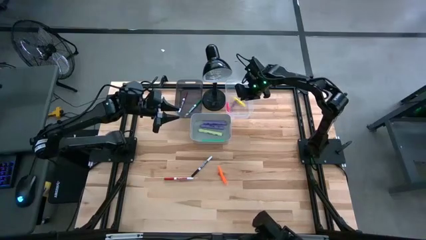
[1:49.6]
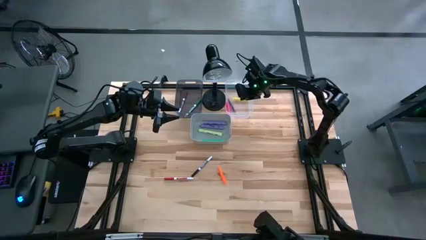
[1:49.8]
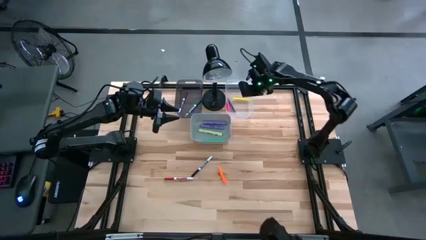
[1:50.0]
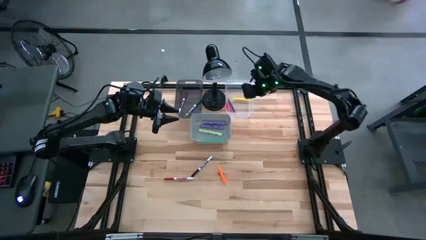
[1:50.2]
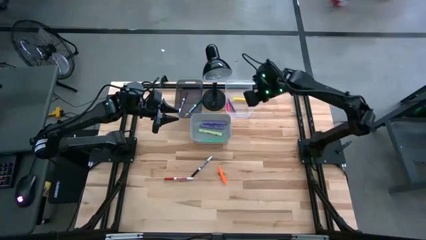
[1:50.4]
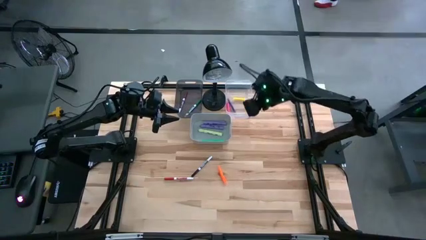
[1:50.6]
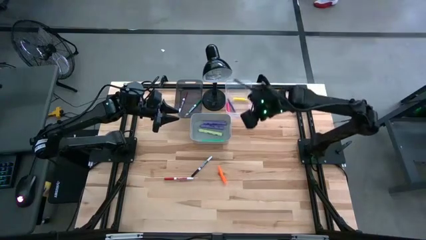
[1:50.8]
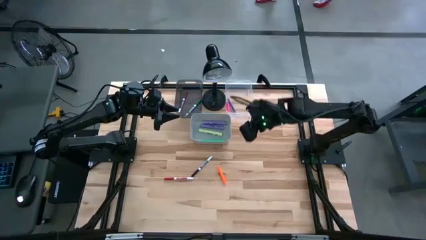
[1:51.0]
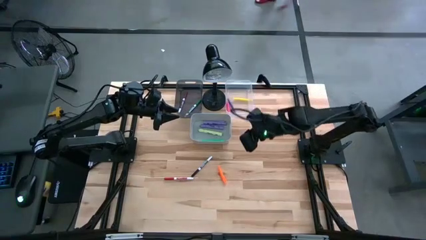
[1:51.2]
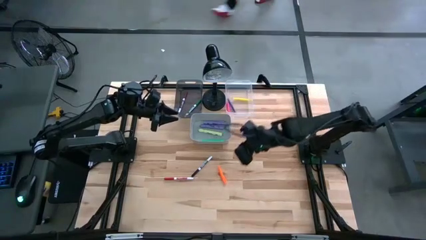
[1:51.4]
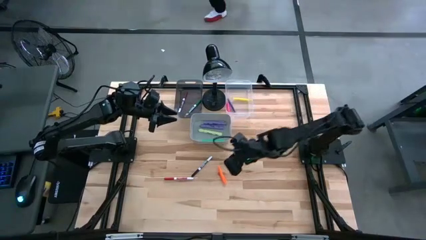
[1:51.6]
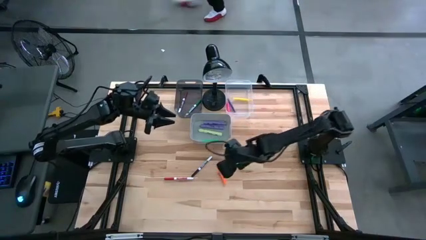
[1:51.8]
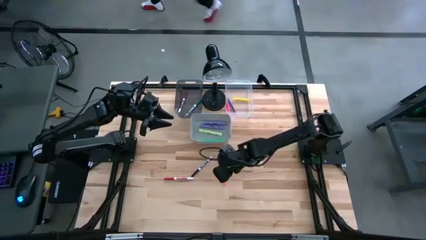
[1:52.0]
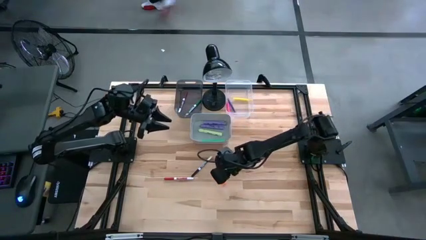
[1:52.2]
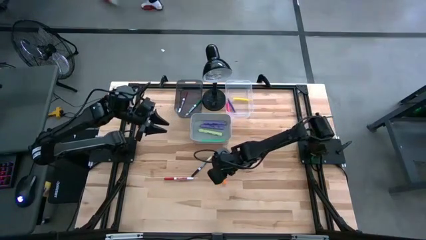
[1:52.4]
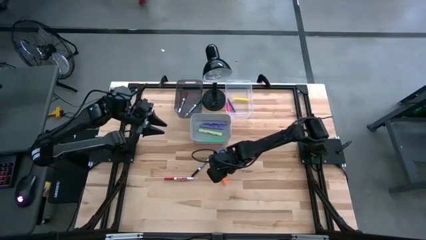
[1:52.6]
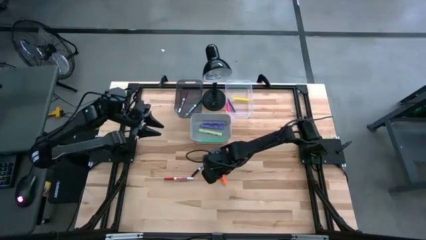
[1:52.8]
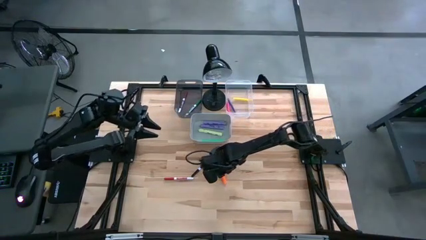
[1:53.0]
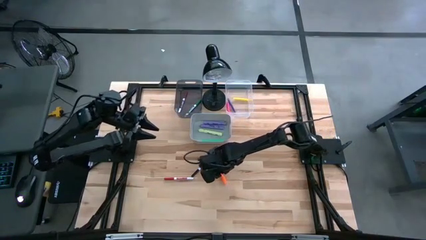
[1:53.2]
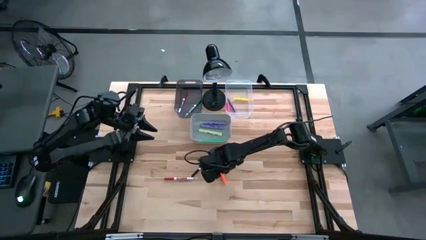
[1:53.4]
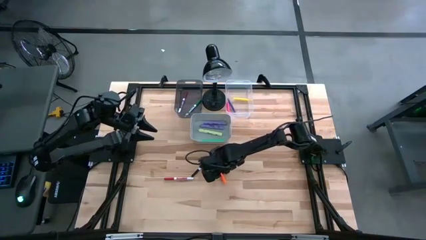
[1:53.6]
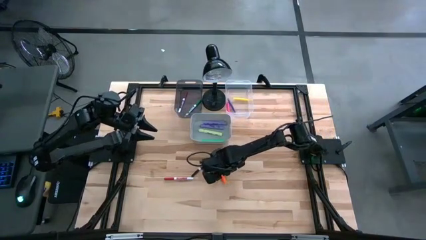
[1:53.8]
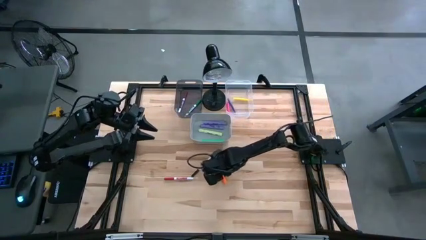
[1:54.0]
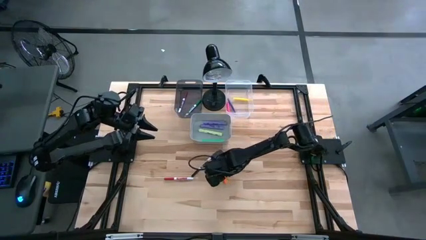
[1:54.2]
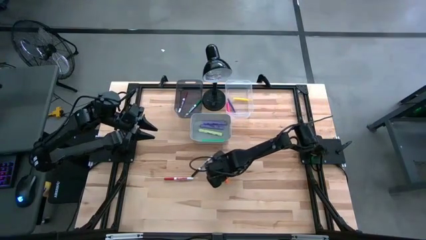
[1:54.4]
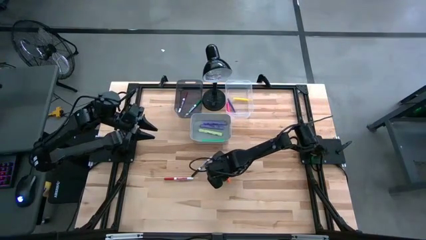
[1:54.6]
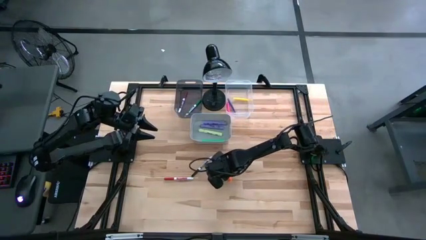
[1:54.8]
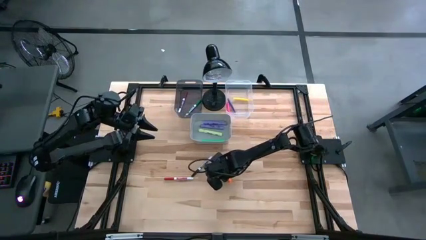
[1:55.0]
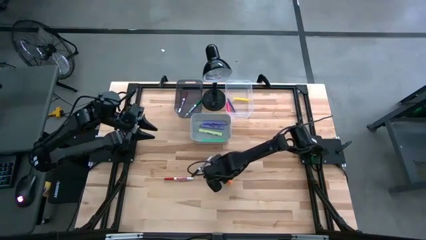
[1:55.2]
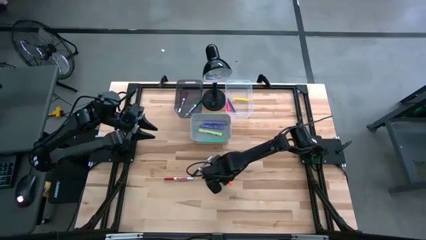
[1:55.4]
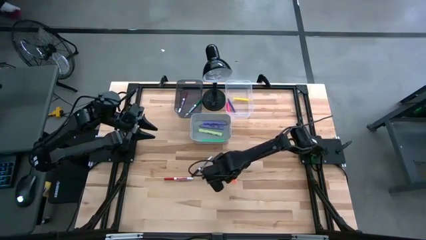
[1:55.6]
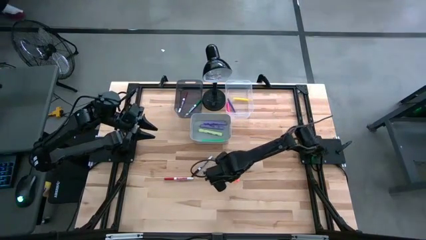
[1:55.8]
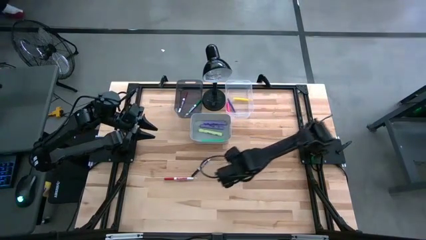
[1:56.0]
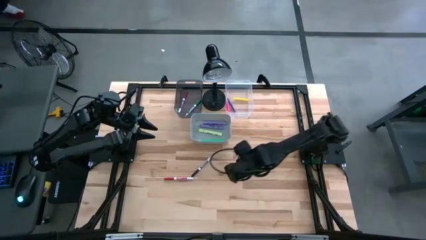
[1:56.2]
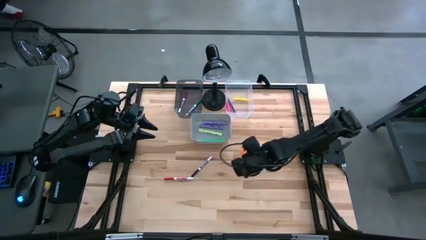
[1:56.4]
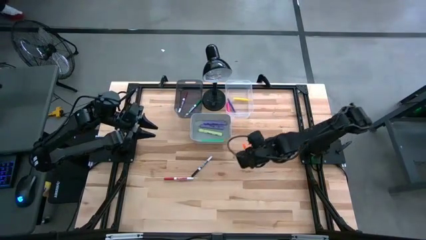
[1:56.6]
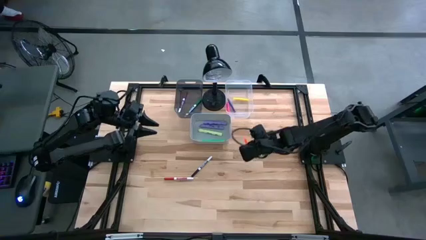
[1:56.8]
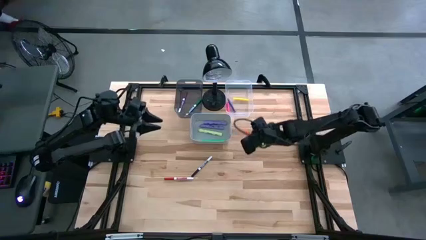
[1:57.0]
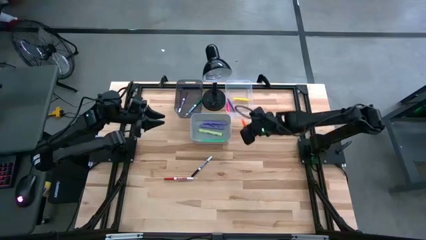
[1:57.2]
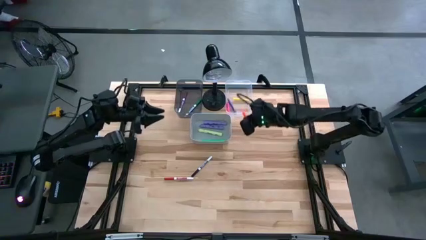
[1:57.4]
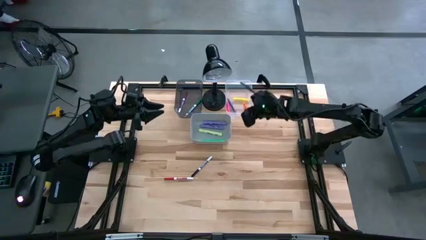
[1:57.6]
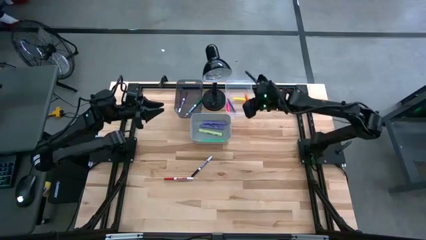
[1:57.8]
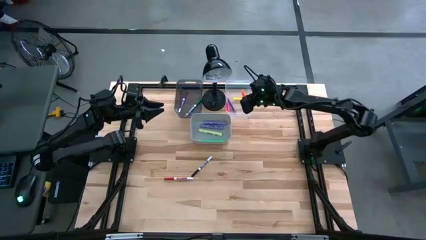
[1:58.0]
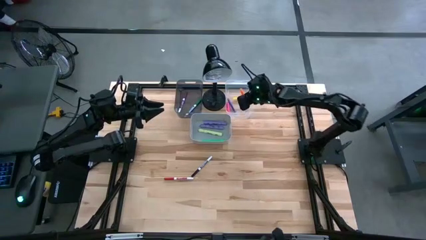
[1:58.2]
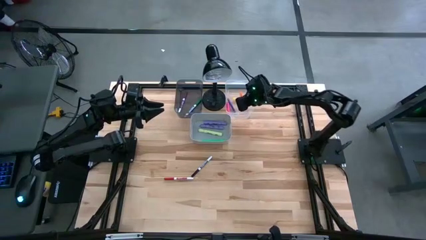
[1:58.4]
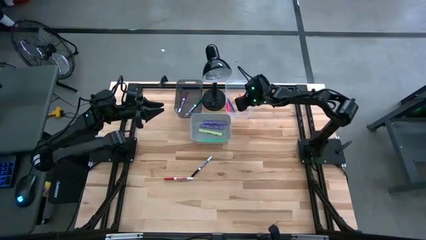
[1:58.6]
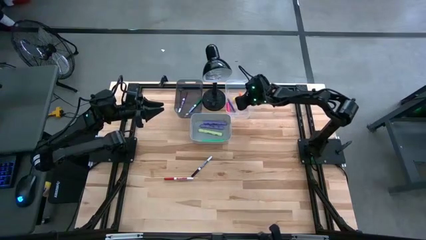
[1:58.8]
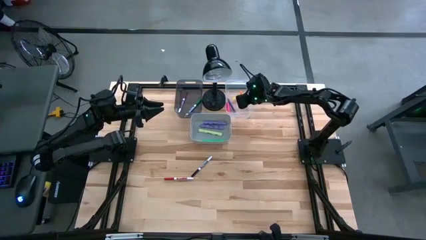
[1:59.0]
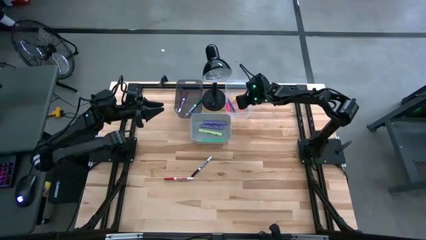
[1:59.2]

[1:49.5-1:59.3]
Task: Pick & Place Markers
Put the small orange marker into the transparent bin

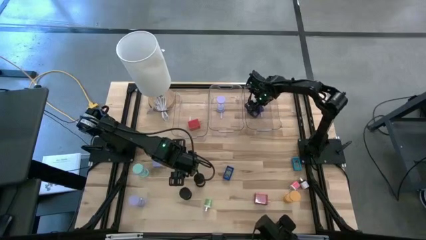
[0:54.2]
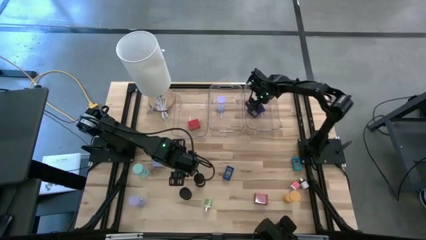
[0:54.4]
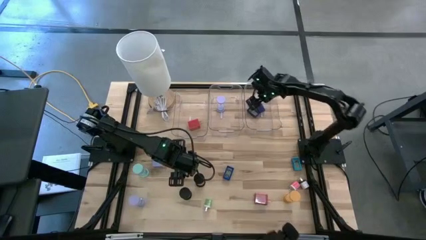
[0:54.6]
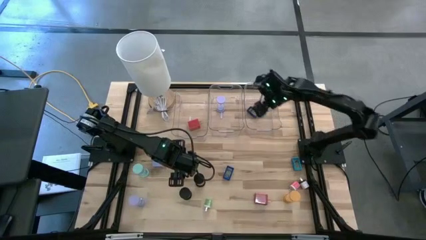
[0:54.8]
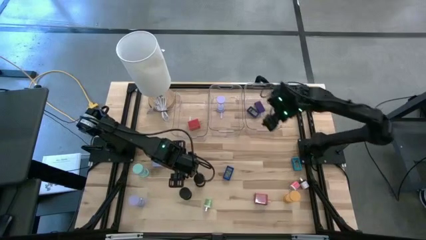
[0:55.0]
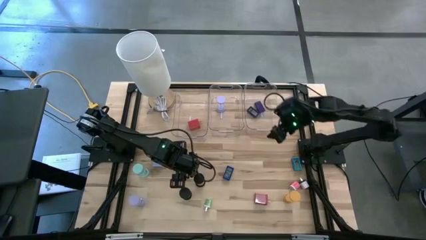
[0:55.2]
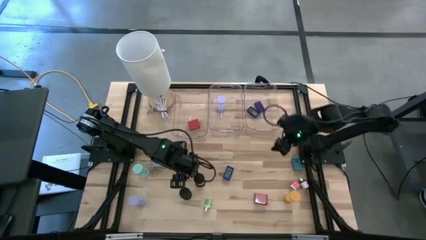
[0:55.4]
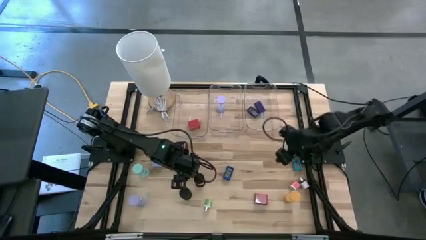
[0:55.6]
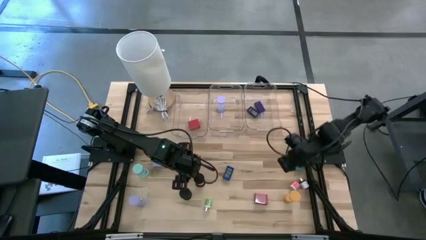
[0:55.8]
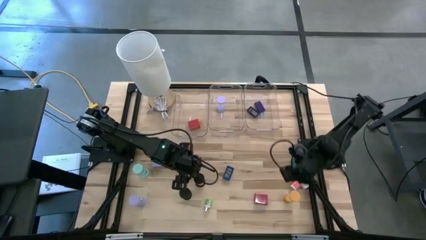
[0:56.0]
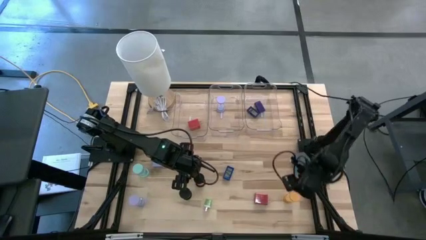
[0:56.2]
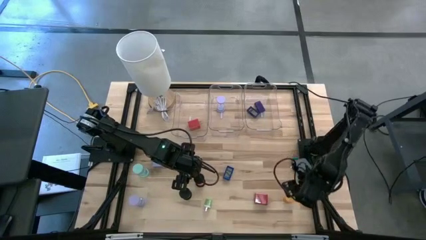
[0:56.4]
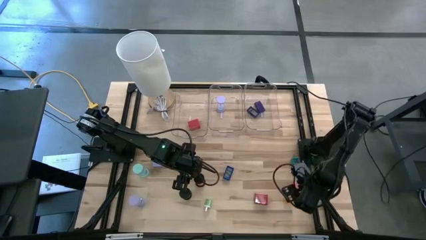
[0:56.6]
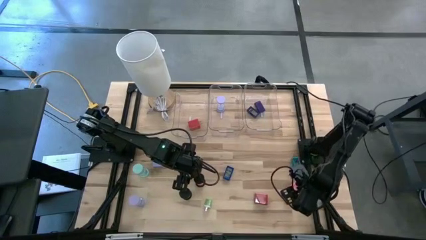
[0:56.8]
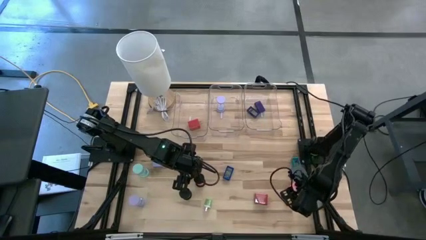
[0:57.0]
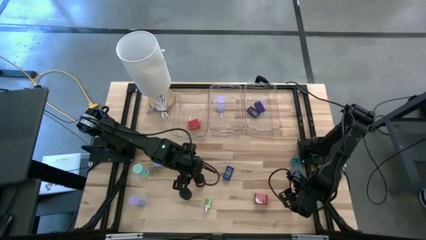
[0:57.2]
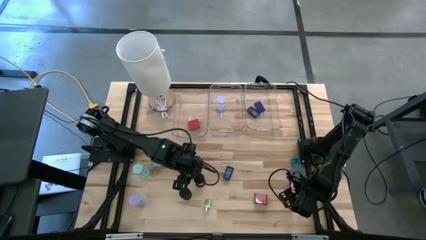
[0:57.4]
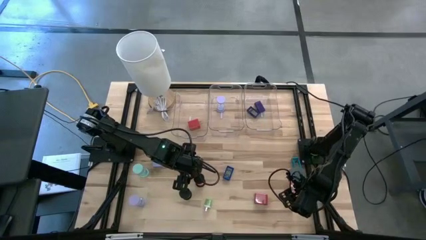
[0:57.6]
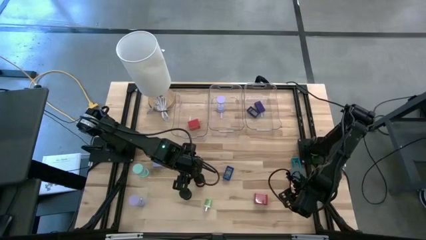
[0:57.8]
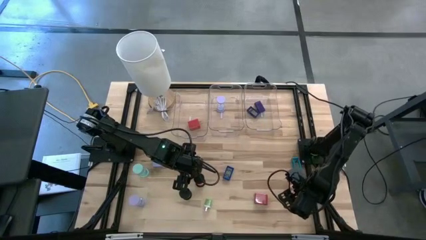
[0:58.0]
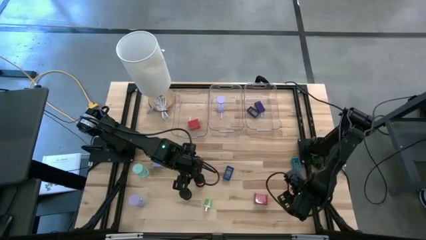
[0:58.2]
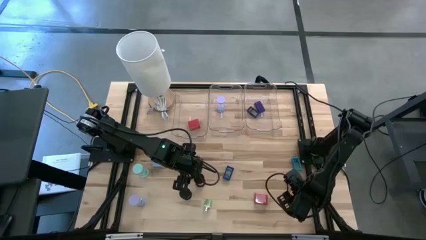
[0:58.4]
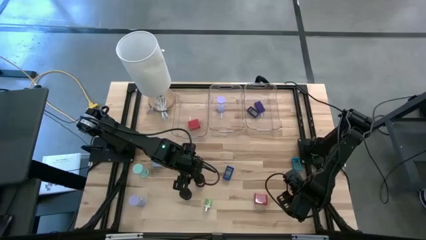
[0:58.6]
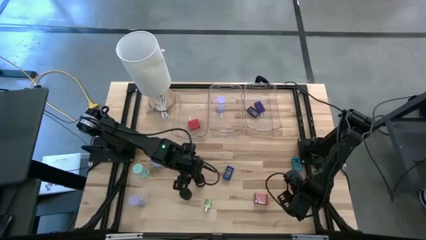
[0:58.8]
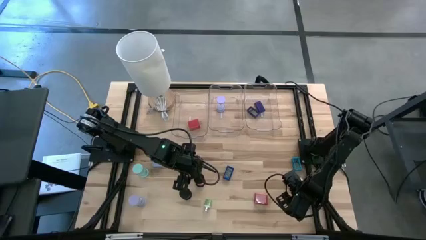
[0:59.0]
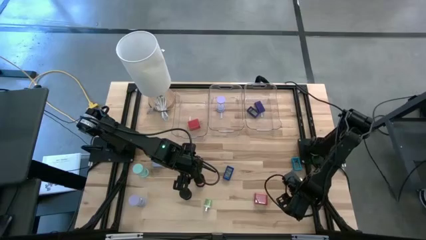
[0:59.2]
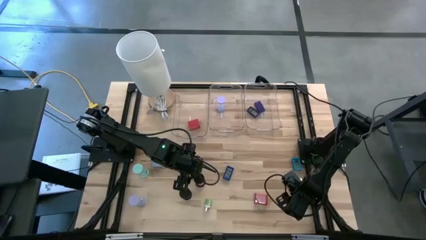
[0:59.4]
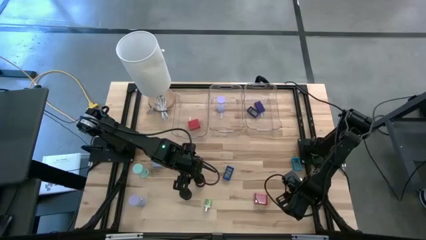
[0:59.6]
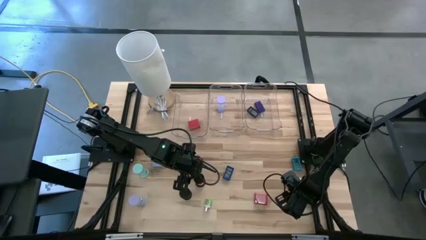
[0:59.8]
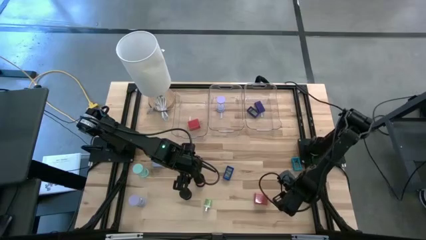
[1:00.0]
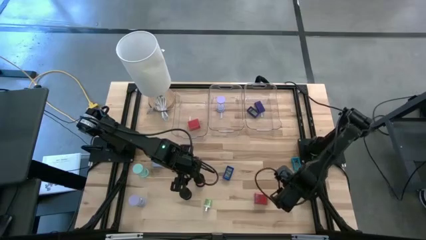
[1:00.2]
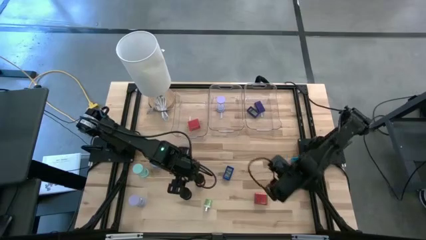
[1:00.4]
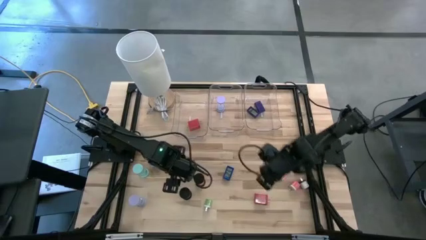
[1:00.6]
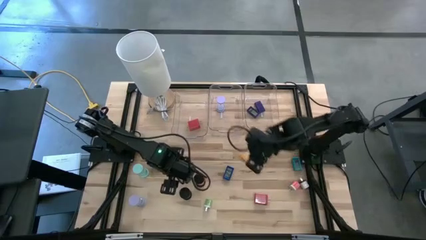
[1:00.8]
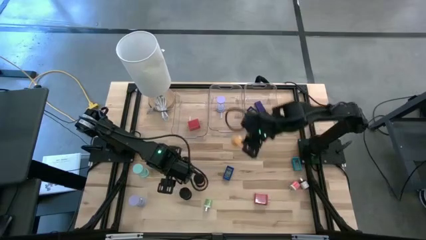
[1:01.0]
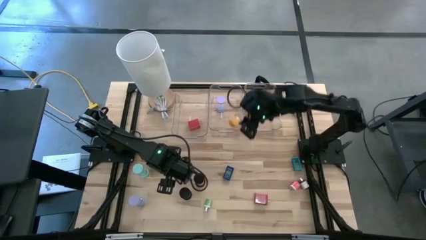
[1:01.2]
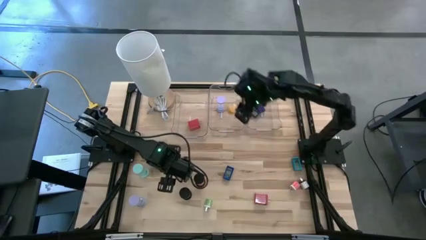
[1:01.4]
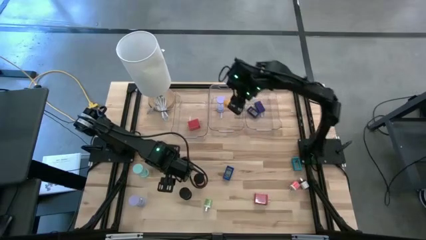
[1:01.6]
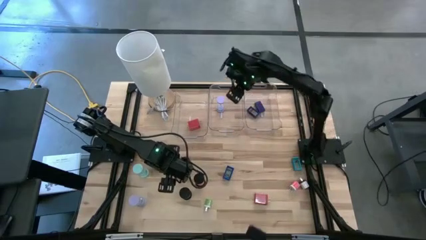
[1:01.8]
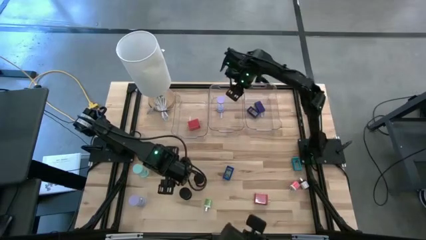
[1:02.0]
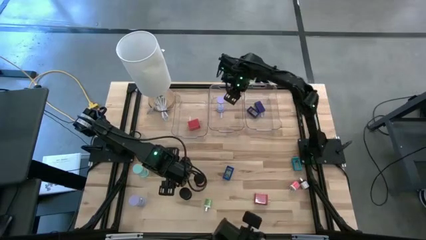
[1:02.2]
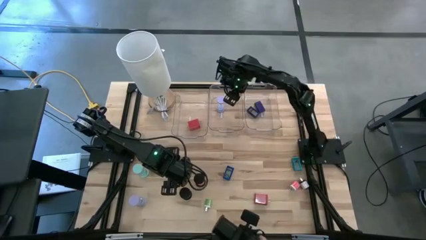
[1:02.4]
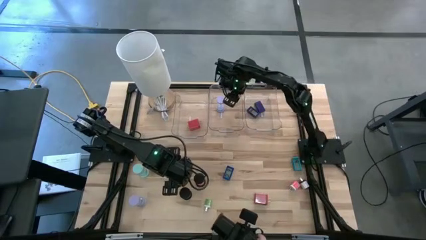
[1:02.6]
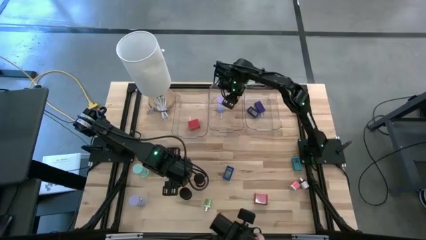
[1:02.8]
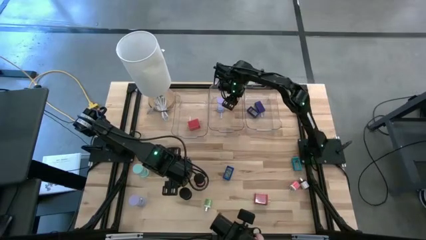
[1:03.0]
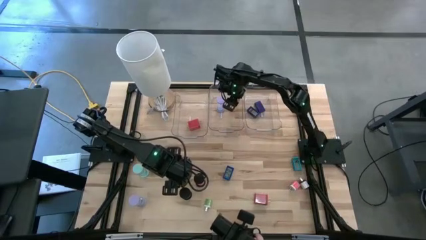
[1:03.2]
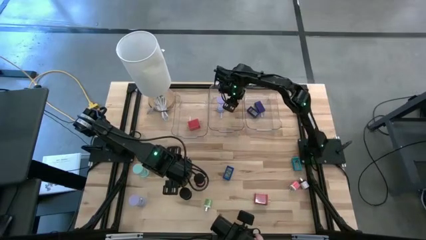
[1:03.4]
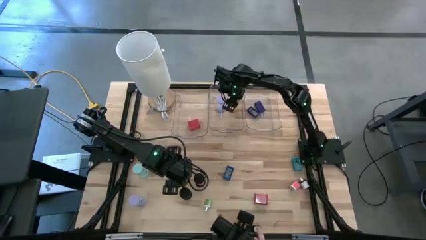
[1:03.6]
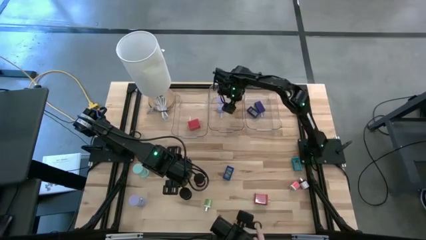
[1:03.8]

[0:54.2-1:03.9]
Task: Pick & Place Office items
Put the yellow hourglass into the middle transparent bin
